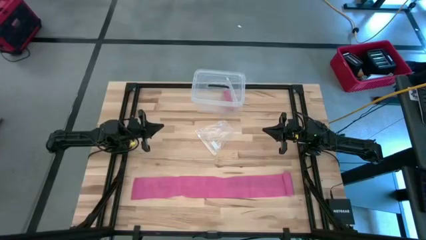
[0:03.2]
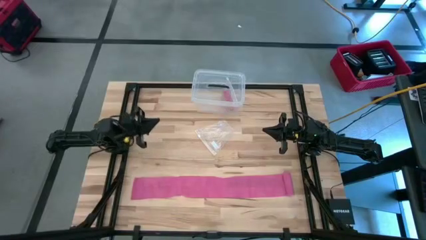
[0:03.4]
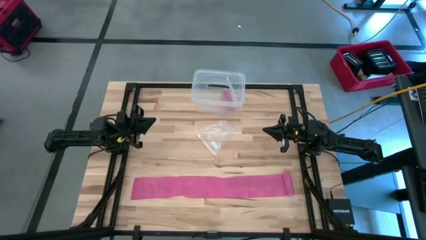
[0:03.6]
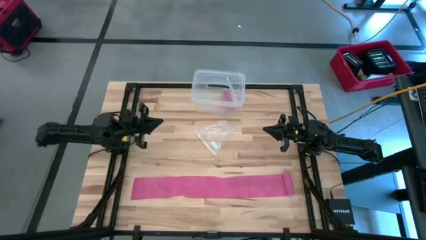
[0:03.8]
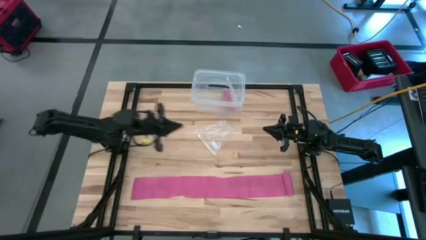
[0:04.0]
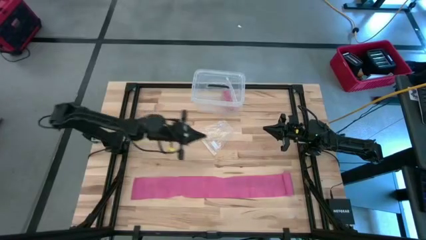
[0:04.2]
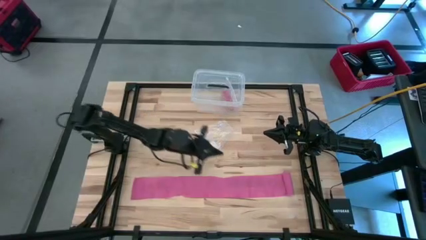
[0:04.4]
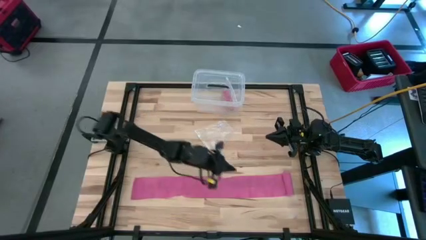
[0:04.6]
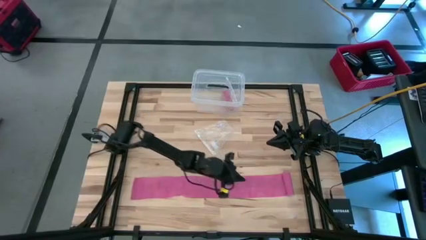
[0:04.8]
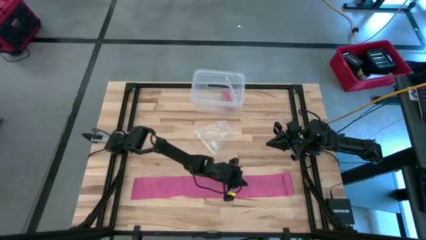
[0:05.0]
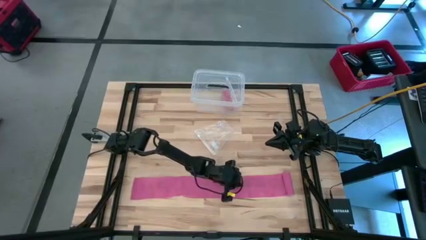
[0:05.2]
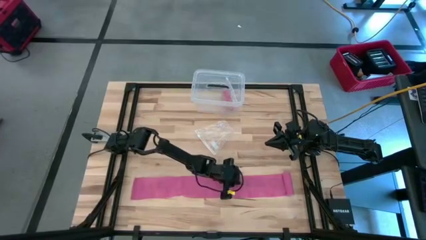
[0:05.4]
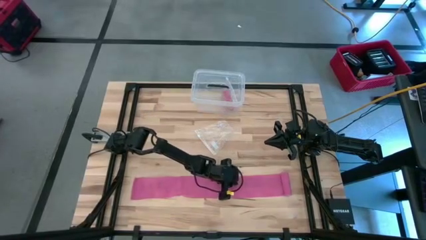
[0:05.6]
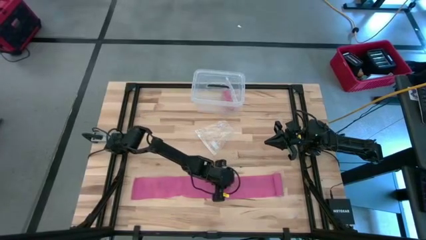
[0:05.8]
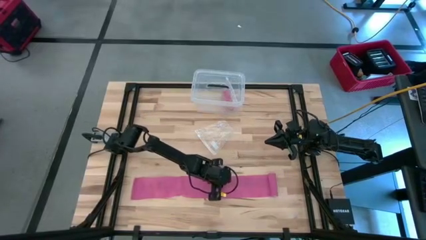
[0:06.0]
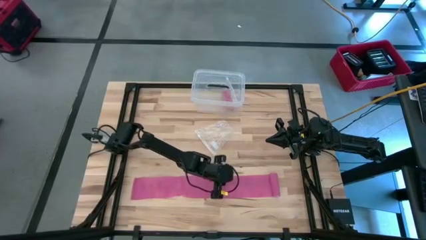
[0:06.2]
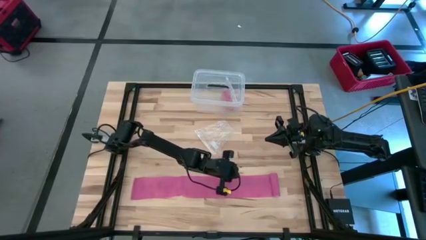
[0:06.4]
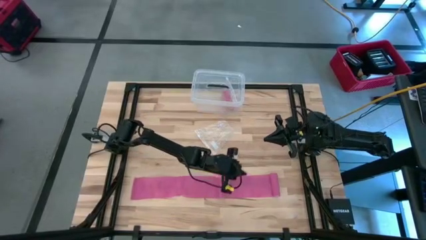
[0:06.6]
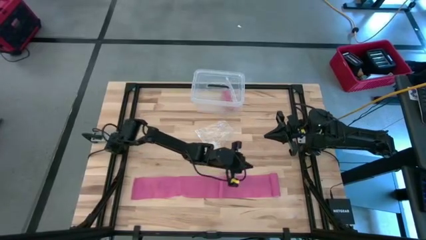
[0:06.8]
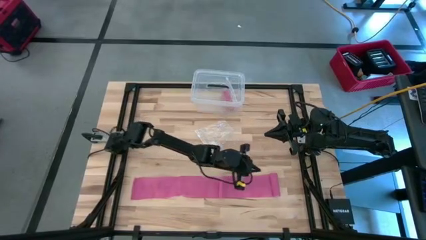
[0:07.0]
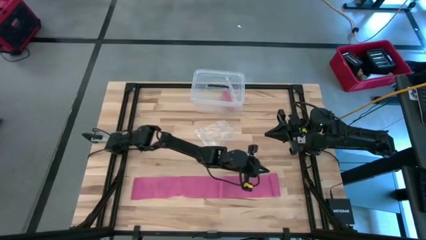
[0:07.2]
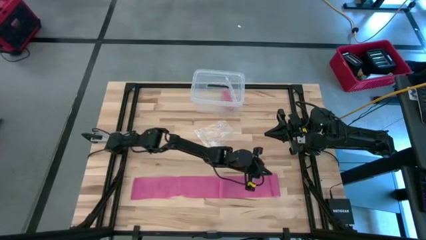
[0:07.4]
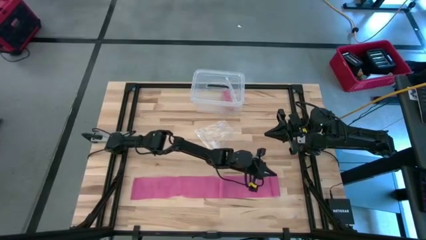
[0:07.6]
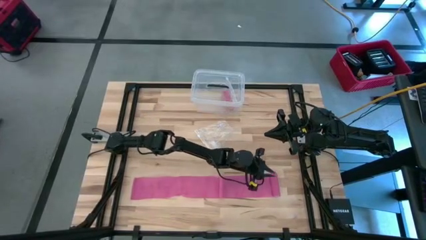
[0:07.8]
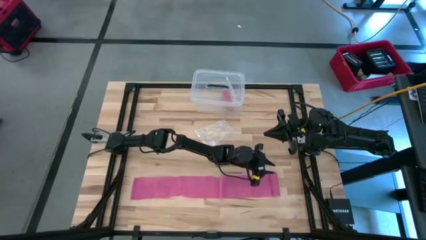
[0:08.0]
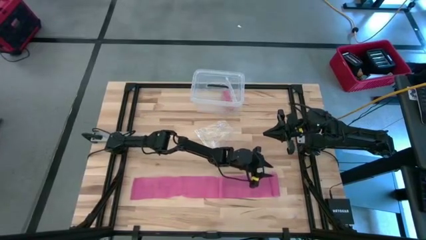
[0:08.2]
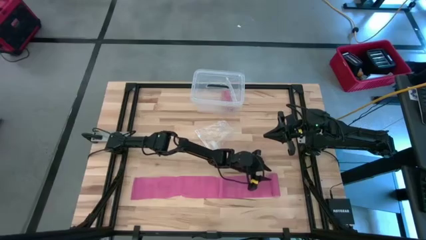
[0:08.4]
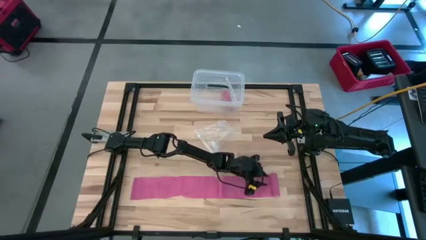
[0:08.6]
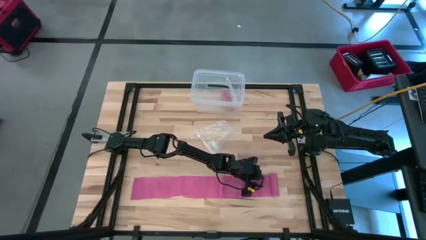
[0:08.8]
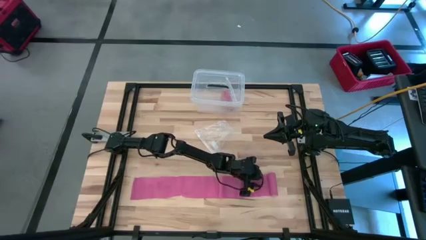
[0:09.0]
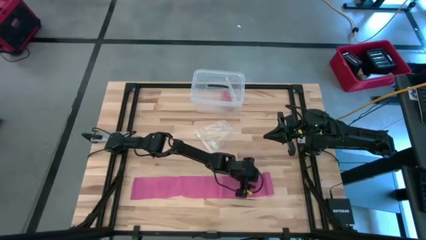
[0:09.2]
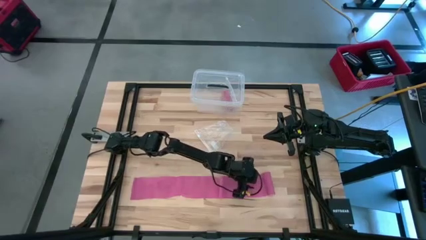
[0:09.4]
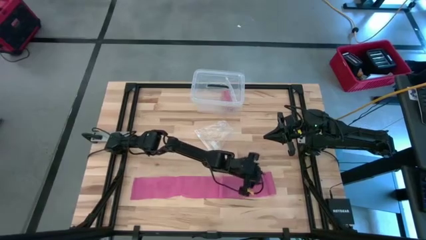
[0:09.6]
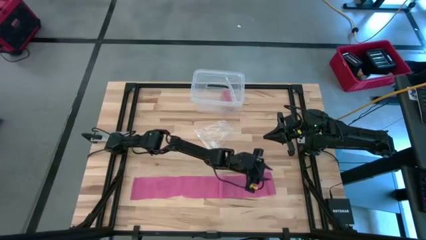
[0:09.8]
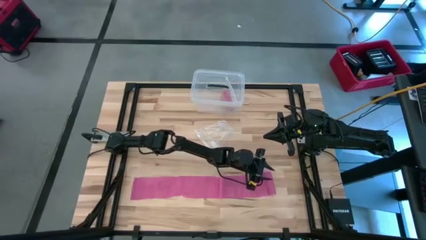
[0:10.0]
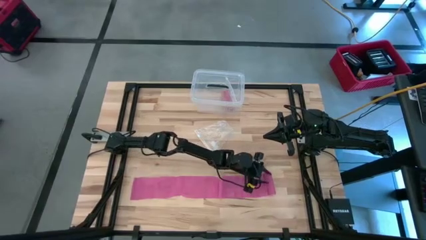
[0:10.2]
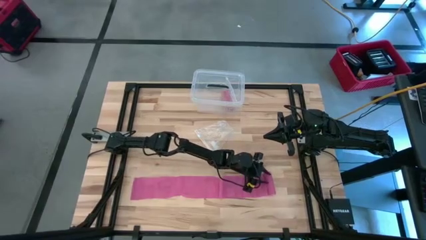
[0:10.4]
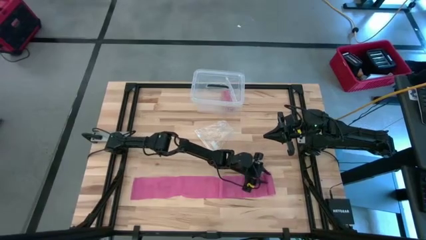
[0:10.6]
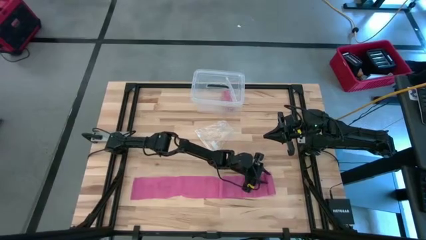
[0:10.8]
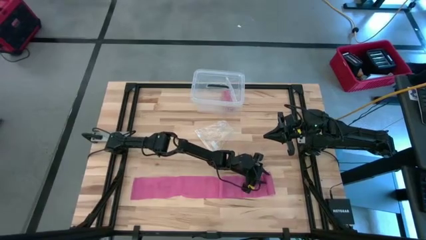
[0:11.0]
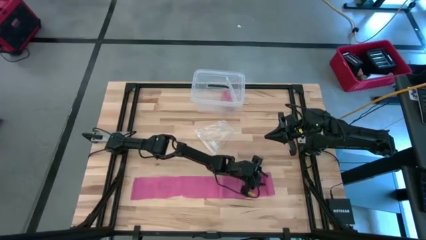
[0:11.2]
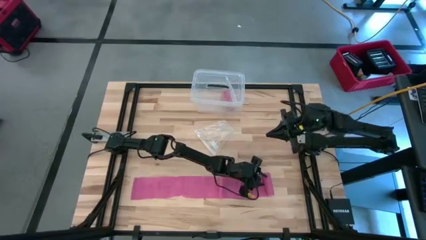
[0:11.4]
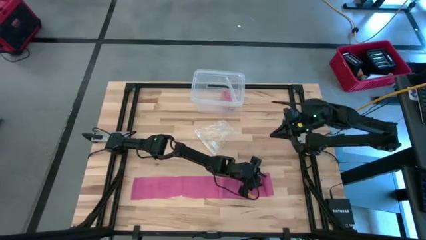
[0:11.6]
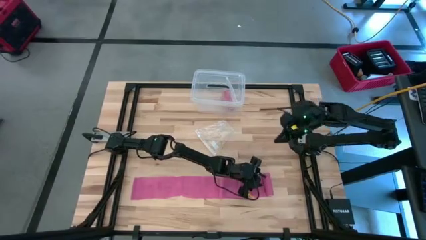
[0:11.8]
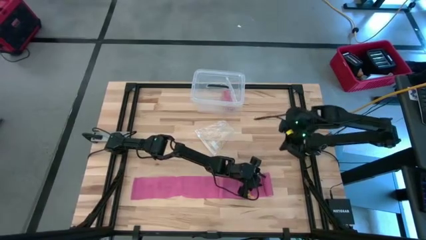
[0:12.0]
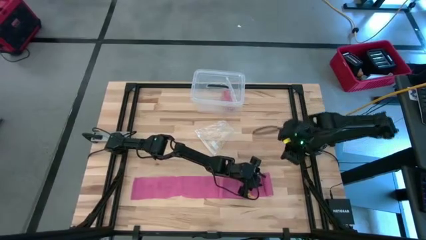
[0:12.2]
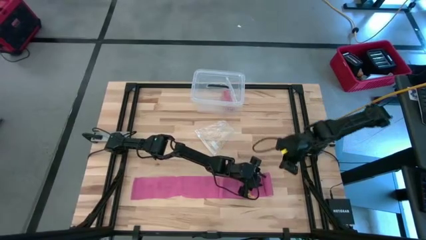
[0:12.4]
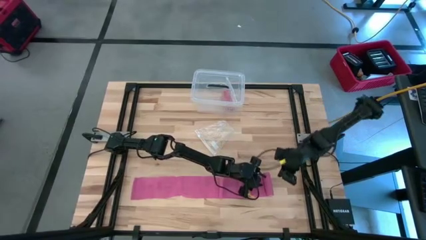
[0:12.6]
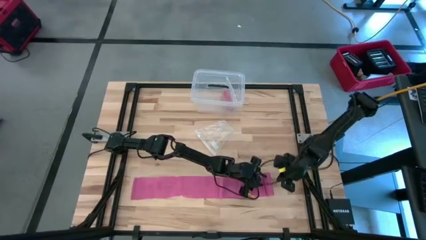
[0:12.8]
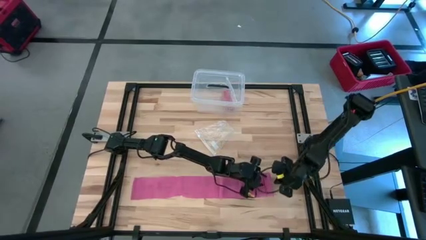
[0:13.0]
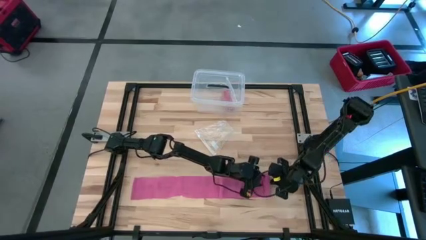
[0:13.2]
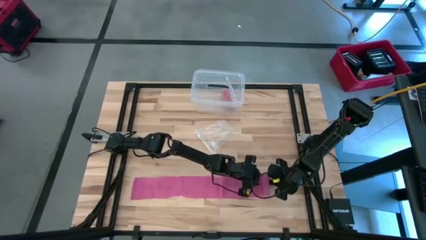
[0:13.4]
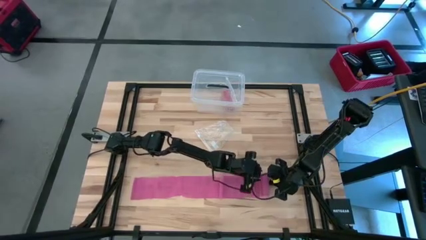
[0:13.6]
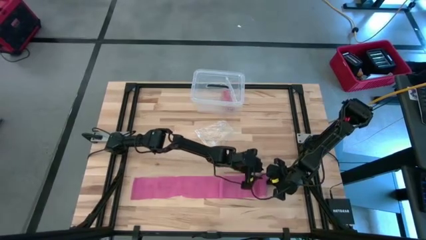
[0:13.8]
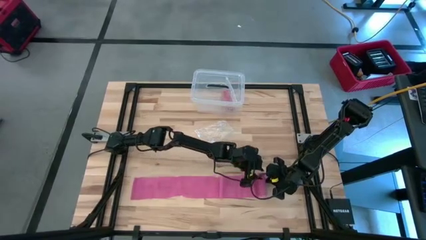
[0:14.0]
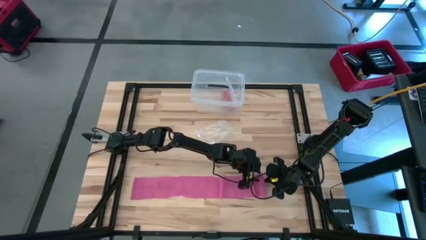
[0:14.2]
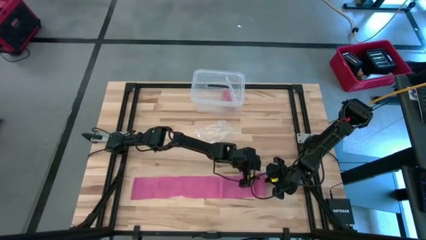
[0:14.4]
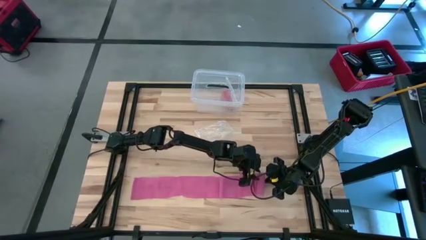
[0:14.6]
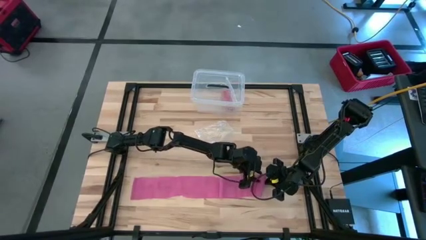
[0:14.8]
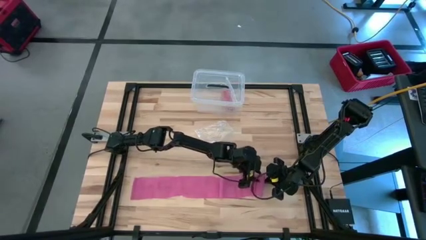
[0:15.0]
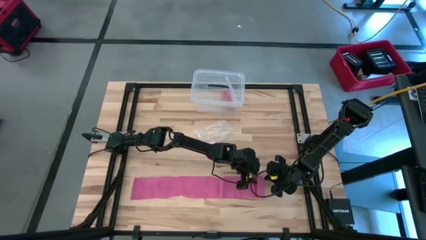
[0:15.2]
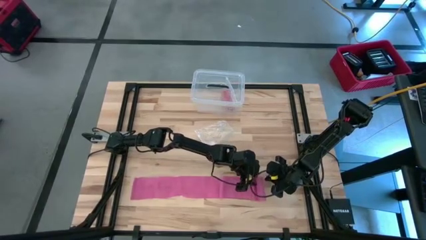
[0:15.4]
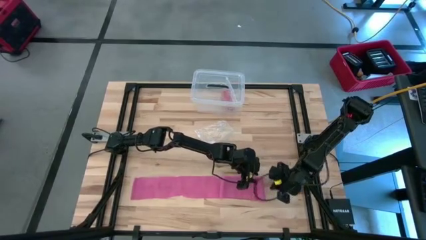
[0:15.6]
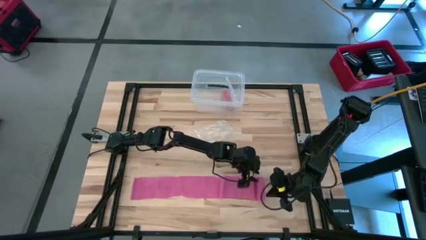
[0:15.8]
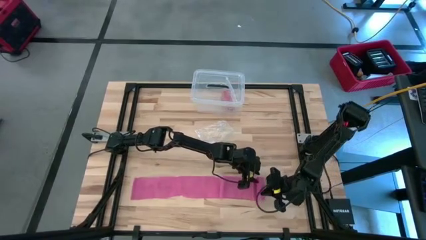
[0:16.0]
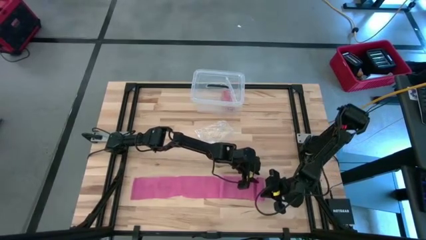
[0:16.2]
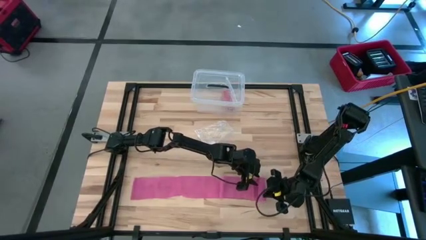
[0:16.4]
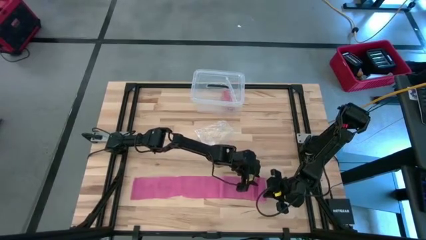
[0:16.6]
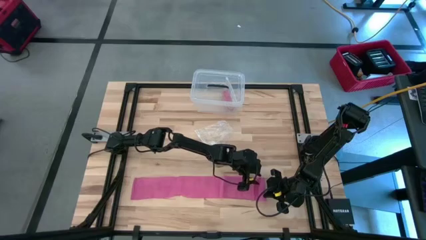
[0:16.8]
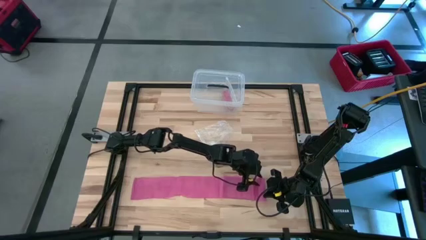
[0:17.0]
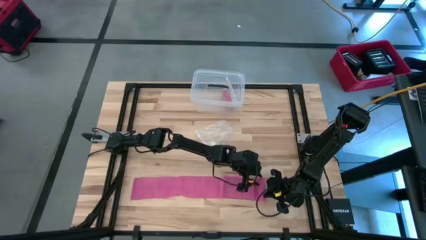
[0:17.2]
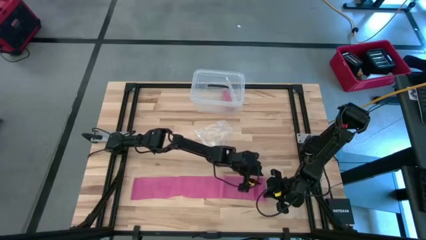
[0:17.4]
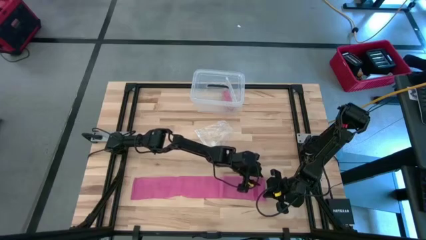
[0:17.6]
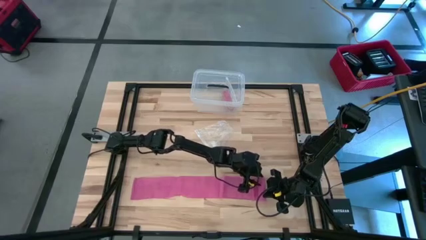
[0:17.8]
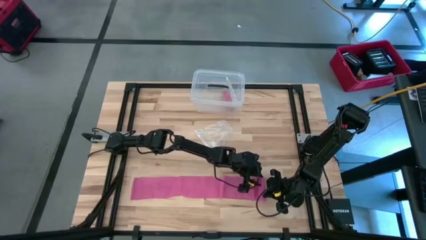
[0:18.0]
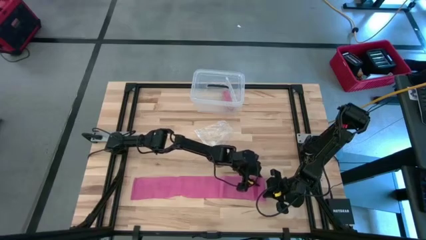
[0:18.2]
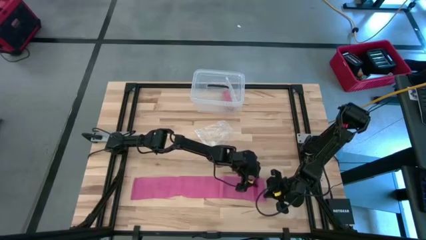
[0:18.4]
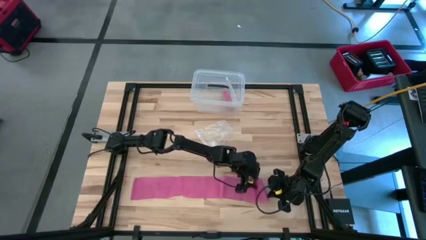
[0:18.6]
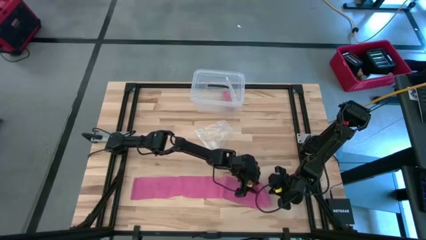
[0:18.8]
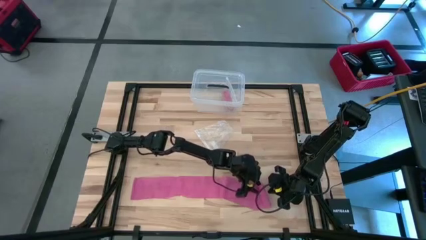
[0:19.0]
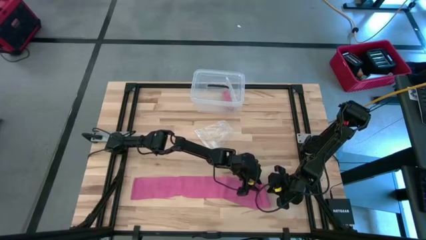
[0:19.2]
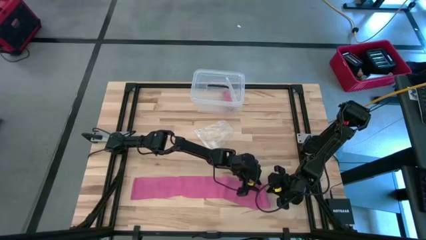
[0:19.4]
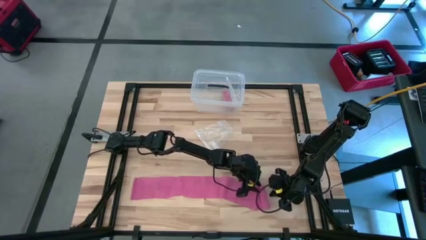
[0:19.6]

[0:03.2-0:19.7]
Task: Roll bandage
Roll the pink bandage
